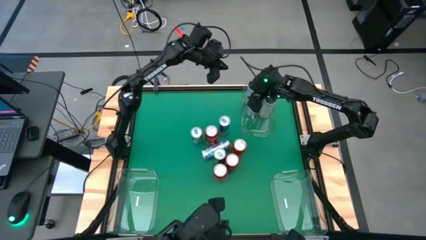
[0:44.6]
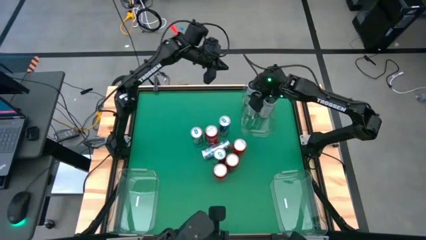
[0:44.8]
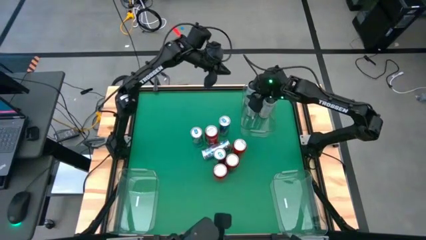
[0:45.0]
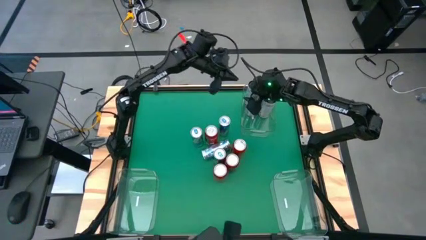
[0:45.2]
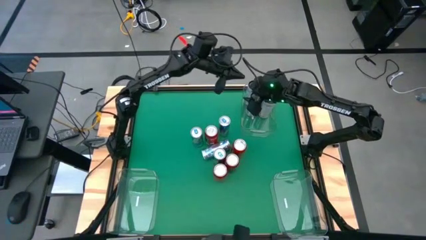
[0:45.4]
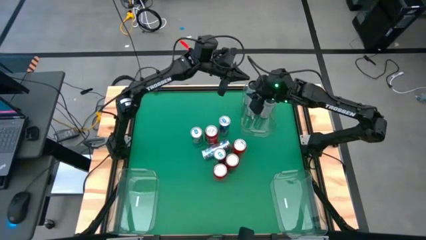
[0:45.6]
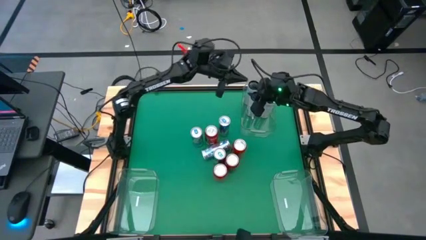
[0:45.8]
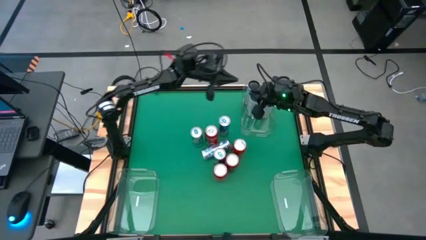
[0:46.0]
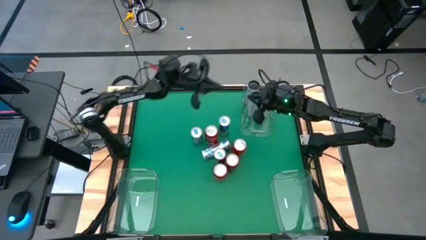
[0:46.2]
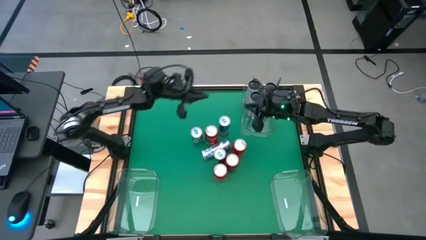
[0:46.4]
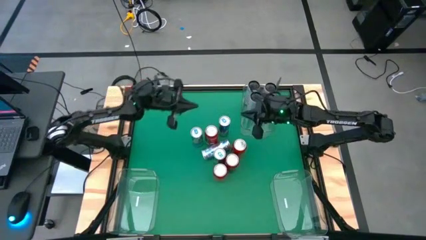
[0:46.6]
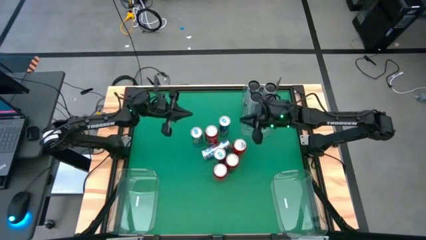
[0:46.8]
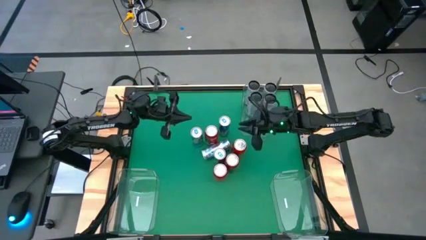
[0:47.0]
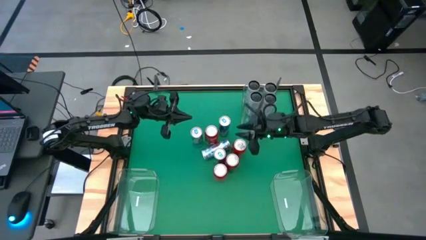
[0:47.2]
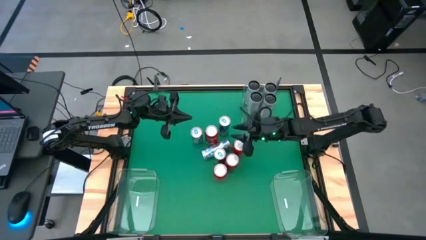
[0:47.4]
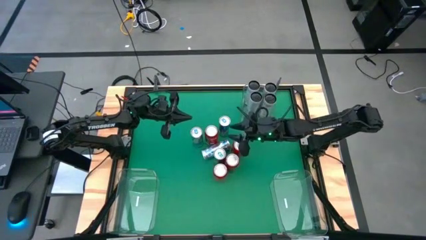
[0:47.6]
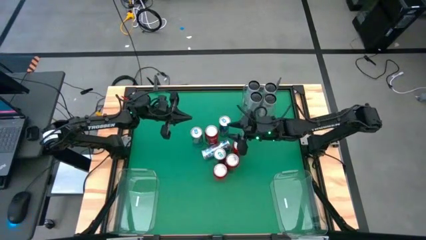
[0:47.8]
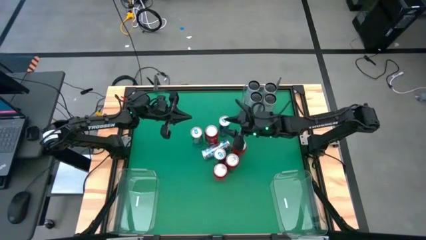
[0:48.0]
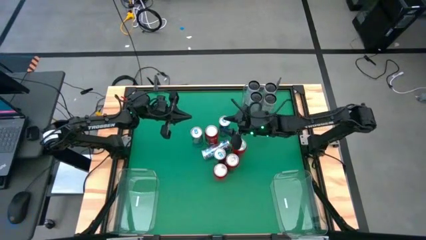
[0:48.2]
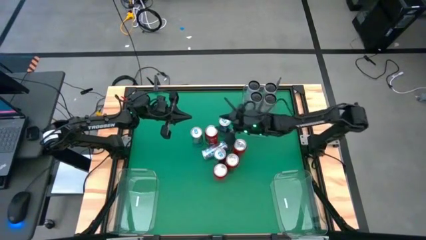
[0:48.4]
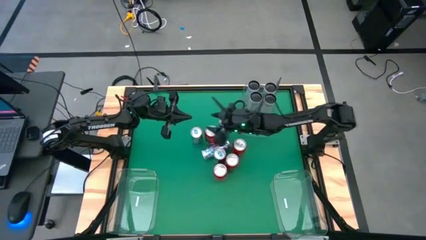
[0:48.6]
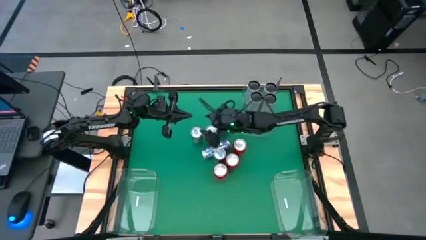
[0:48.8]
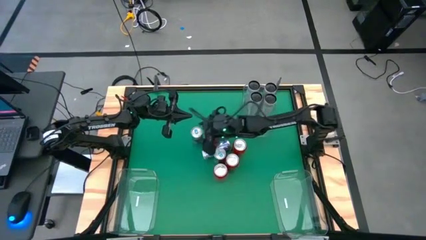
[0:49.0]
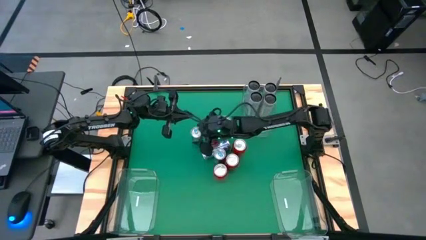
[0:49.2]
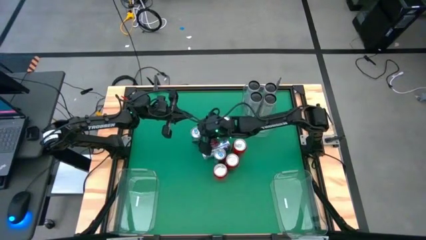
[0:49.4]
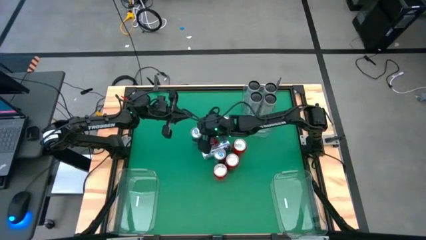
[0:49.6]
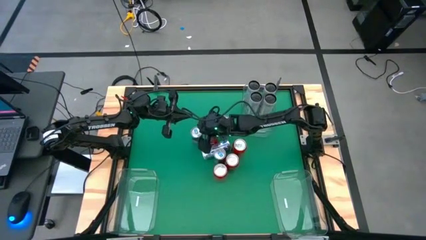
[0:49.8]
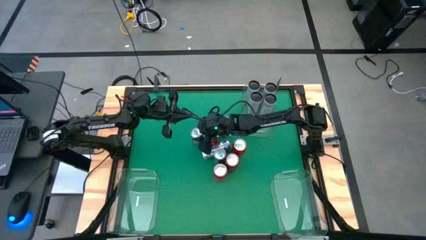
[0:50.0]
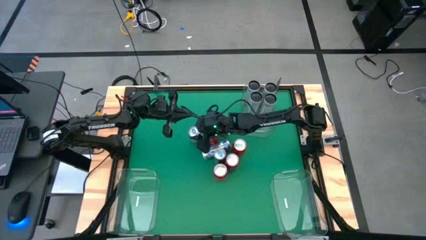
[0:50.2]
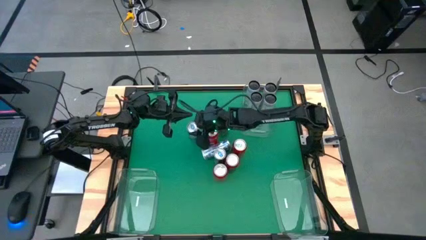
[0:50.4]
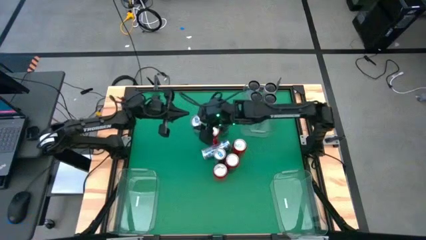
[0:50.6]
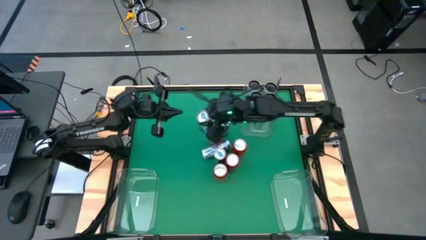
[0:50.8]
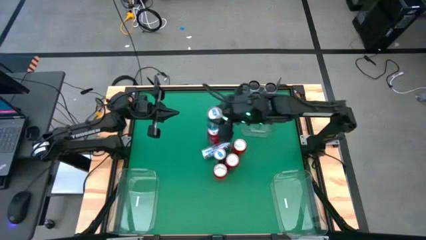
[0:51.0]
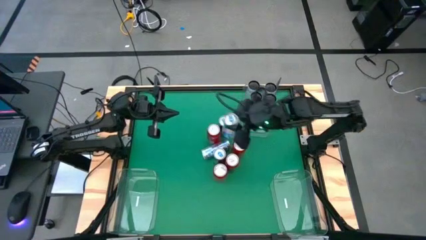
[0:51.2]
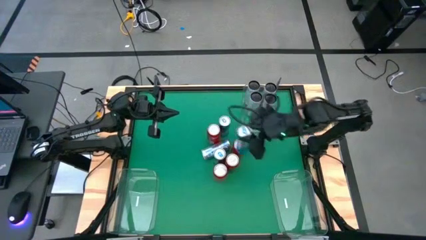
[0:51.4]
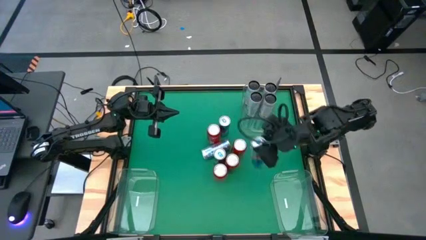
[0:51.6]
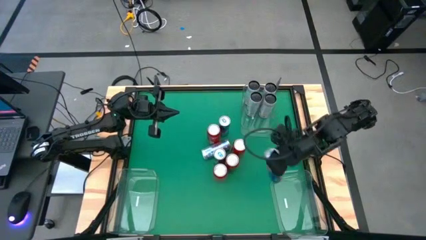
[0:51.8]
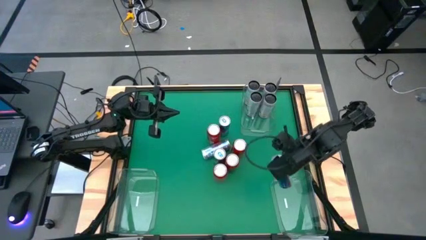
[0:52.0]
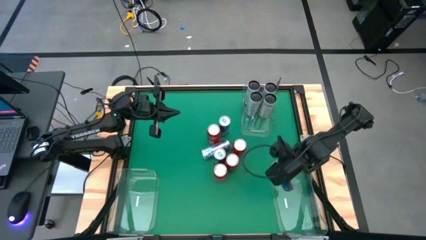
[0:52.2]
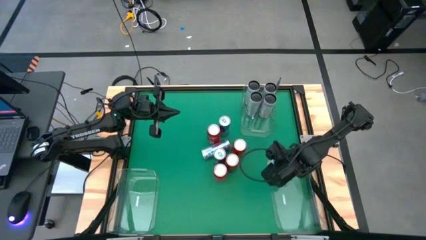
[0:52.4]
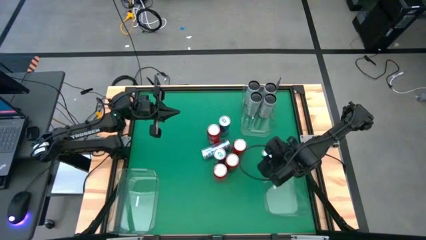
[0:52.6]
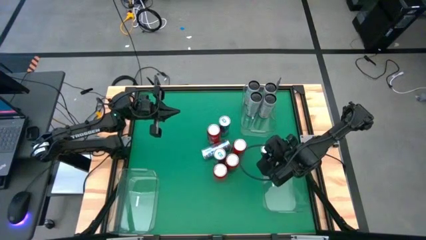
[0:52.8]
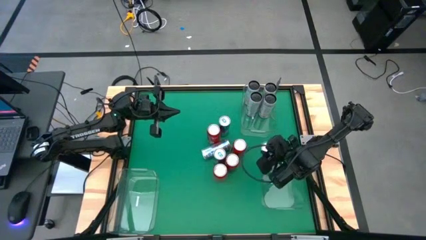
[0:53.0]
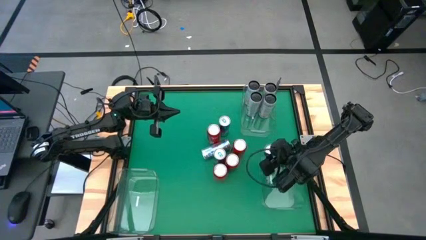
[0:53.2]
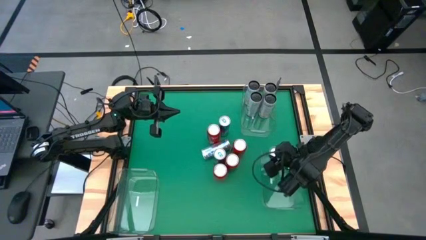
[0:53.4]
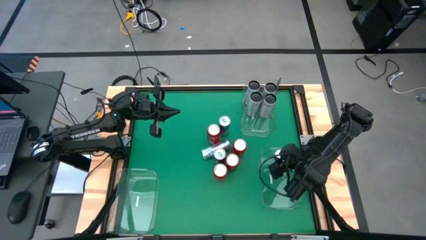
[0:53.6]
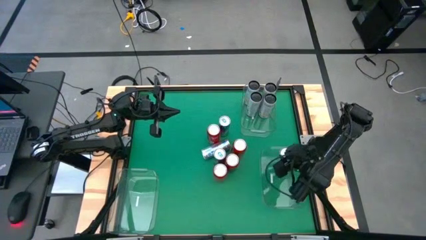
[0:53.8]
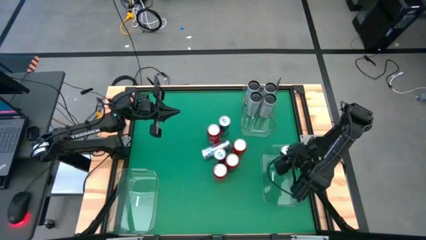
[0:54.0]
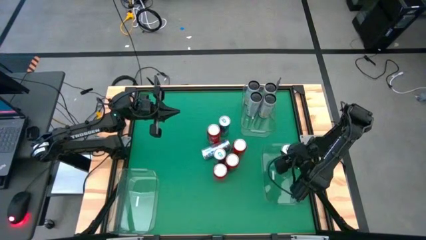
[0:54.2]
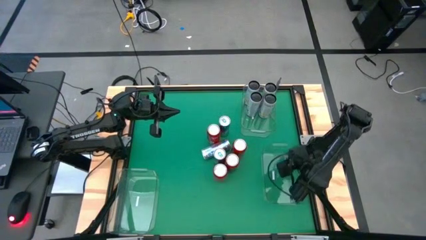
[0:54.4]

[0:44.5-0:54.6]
Task: Sort soda cans
Put the blue soda can into the bottom right transparent bin

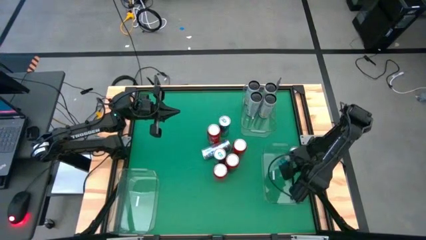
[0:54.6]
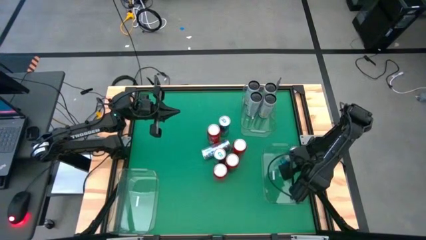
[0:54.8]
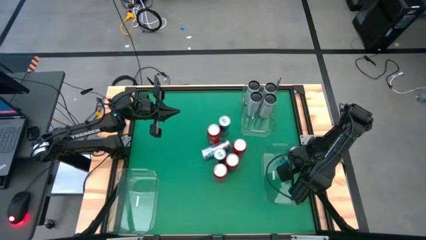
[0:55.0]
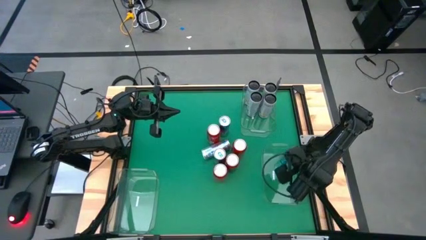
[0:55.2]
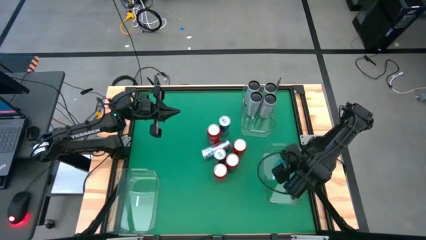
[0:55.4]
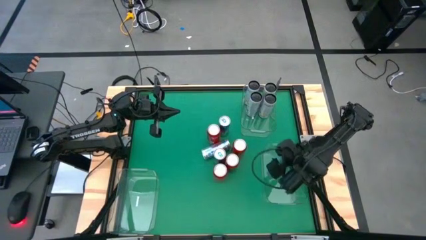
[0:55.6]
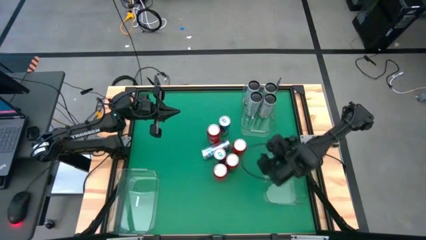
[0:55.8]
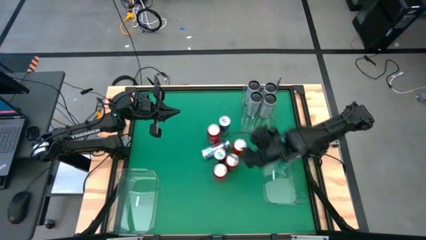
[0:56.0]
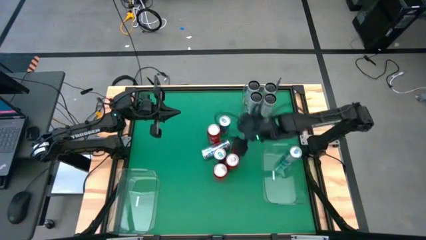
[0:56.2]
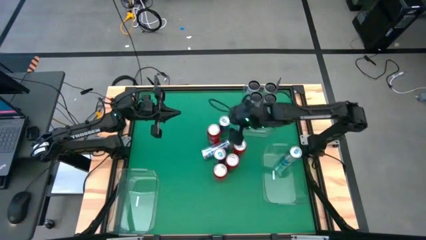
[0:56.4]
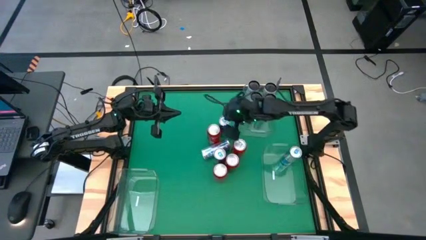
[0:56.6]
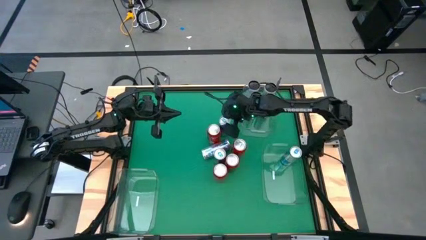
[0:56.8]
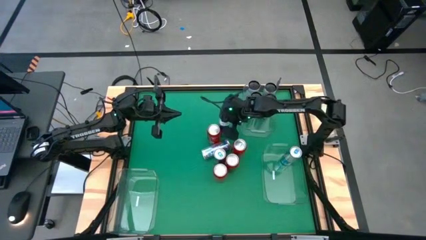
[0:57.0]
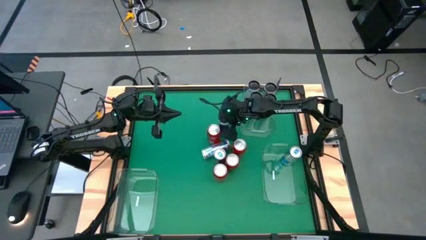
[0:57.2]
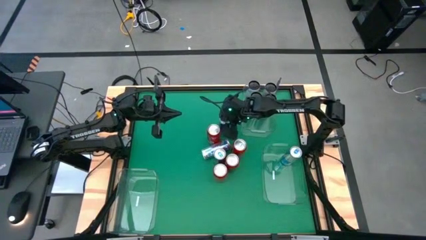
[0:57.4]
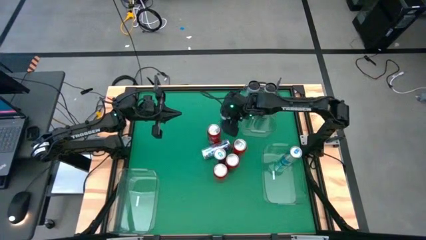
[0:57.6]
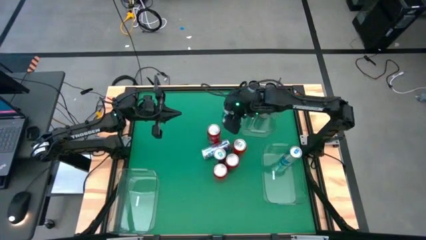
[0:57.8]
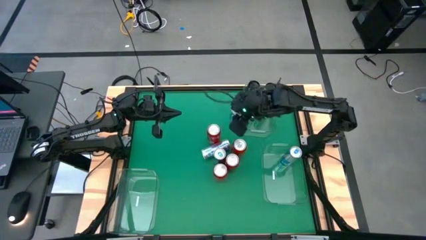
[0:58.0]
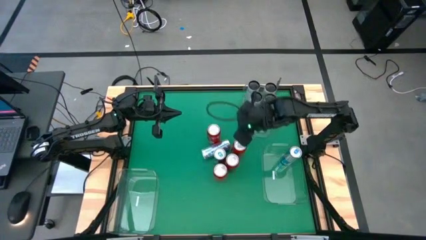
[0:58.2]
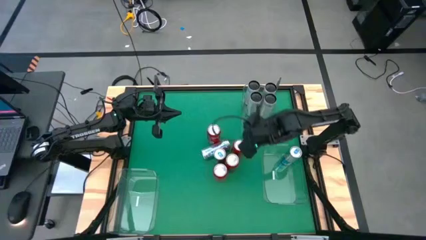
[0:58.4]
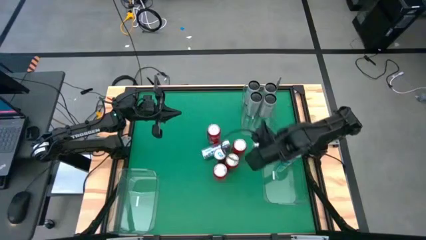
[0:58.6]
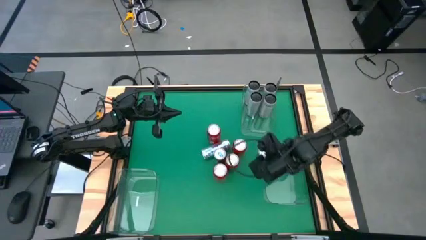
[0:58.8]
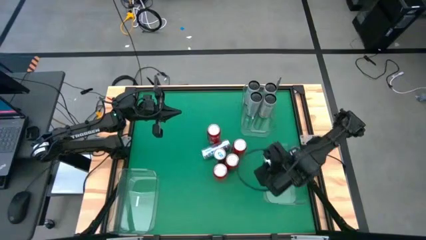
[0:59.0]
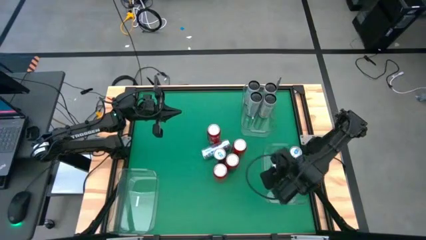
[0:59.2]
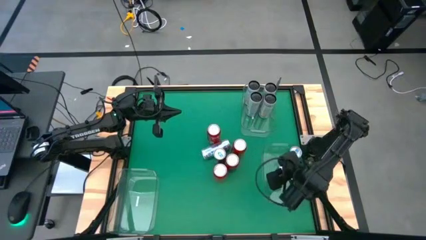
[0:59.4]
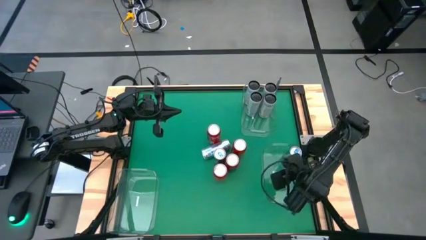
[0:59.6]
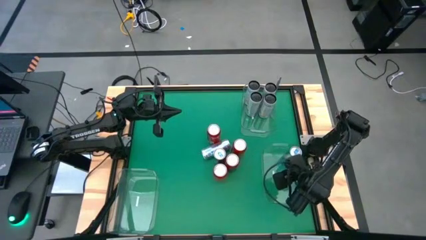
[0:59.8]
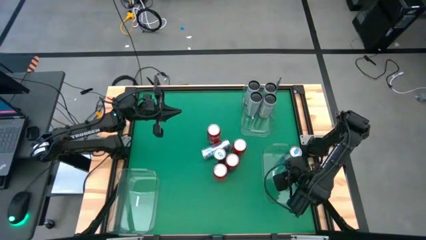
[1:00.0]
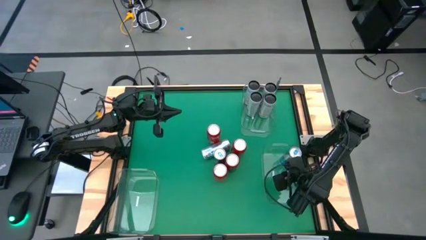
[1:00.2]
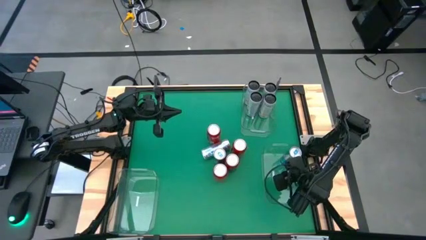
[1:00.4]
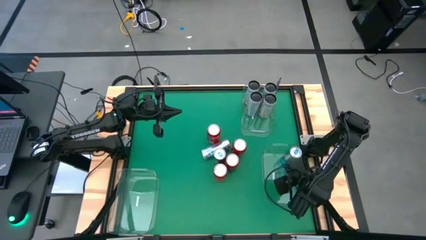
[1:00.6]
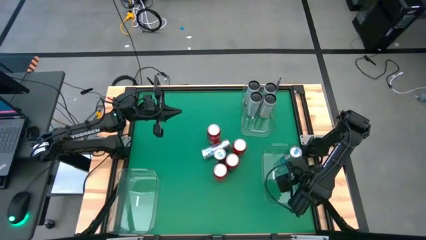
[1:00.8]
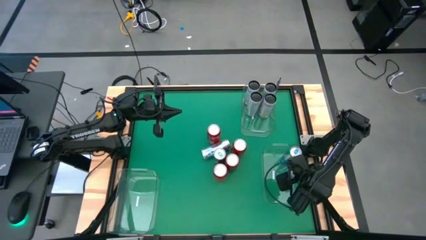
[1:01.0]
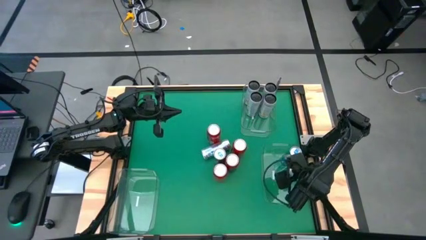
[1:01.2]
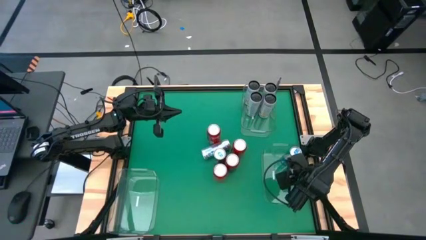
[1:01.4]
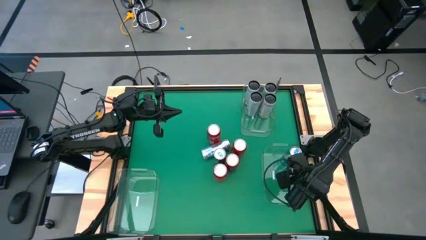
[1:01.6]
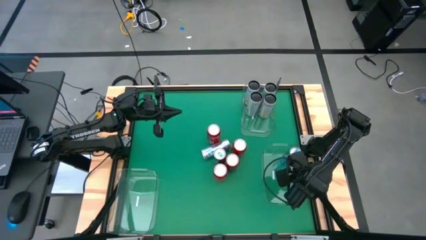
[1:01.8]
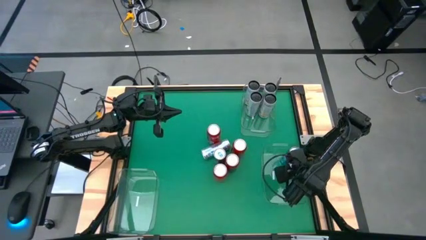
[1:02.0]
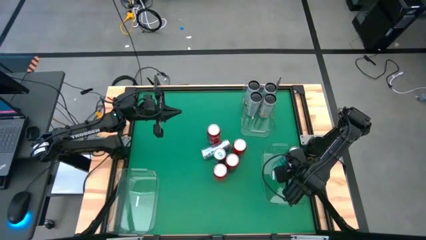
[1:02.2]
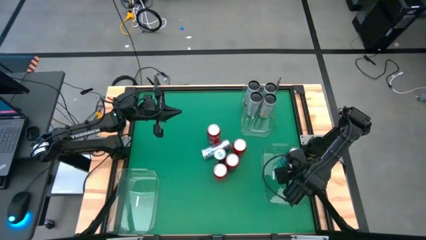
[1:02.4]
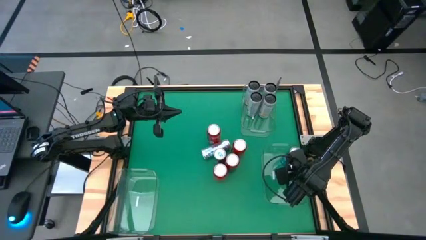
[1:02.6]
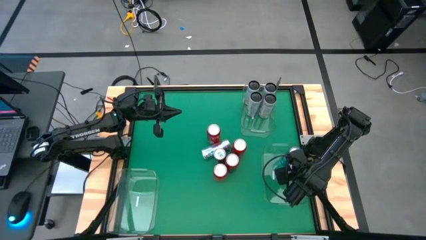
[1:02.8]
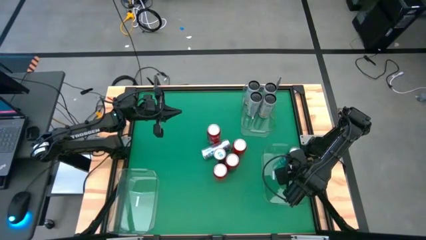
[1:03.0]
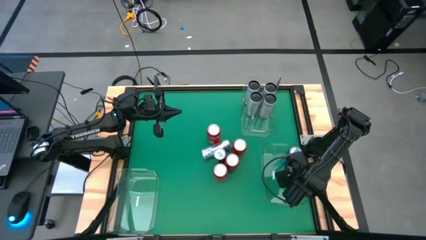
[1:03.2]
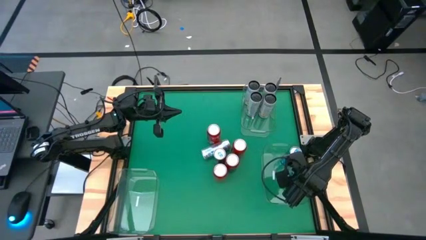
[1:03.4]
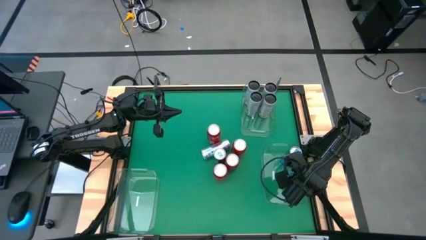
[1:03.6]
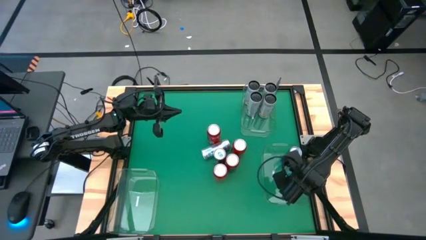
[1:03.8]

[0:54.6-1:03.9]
Put the blue soda can into the bottom right transparent bin
